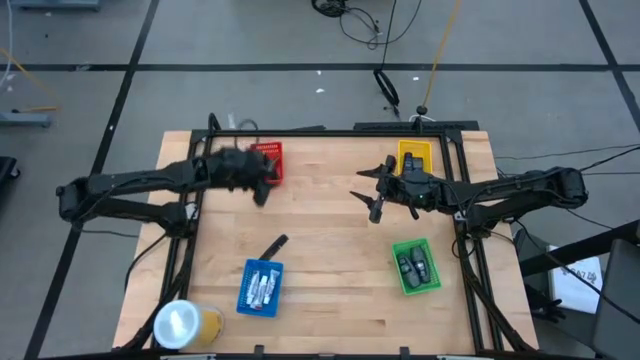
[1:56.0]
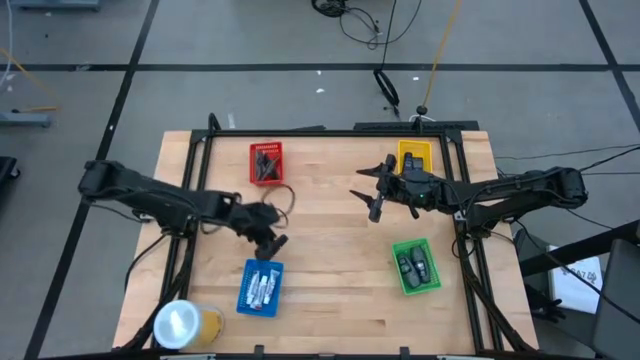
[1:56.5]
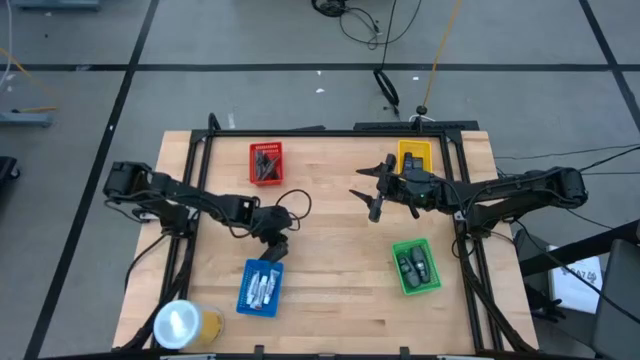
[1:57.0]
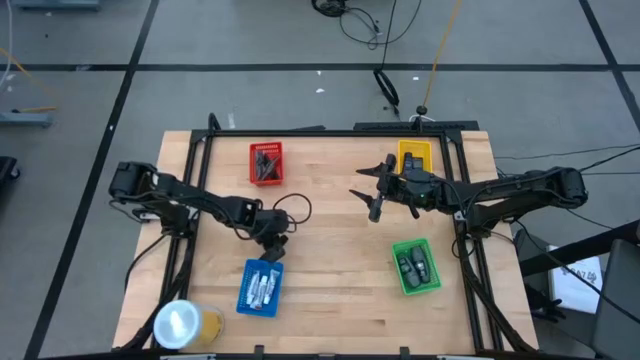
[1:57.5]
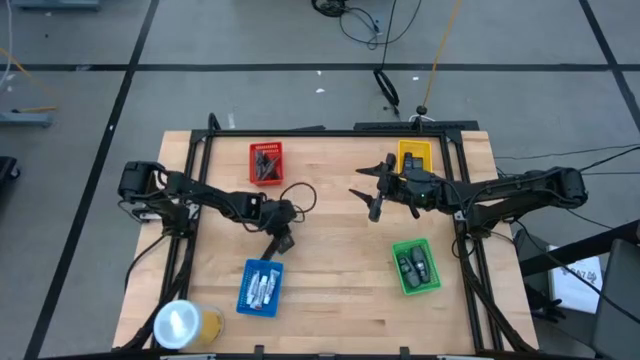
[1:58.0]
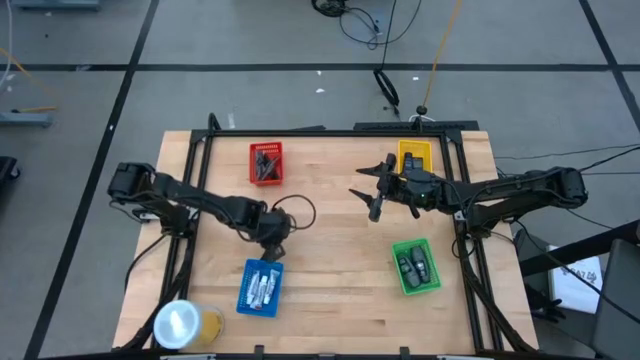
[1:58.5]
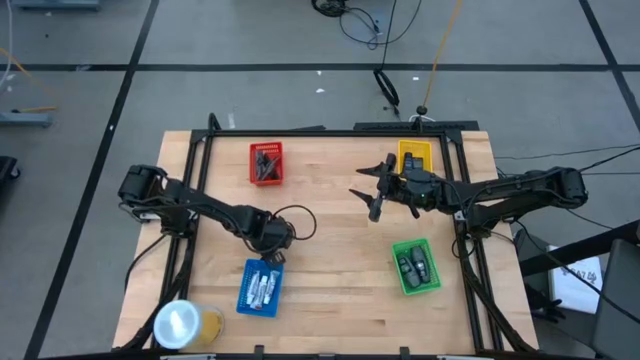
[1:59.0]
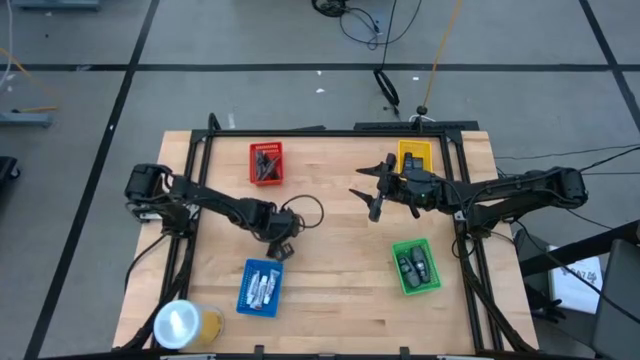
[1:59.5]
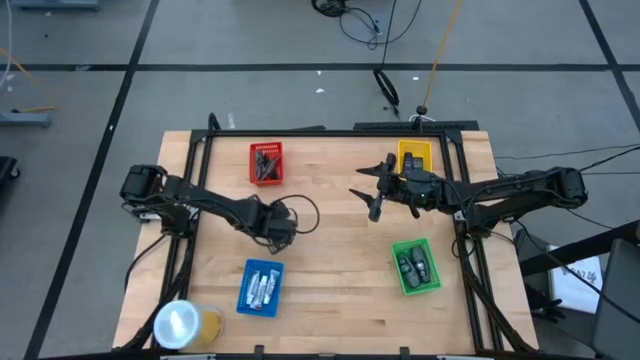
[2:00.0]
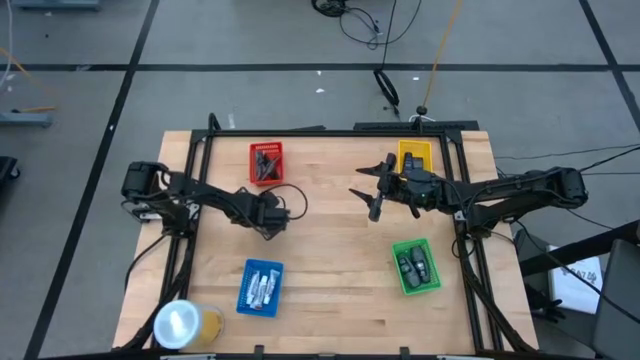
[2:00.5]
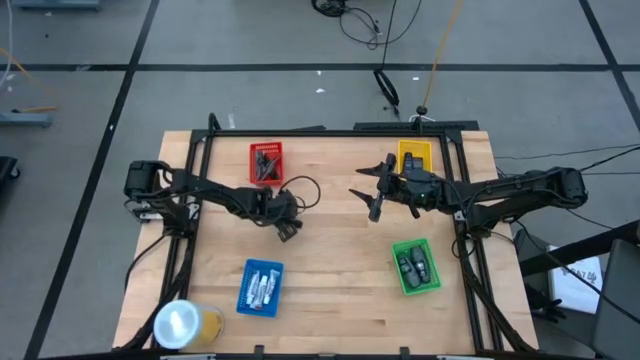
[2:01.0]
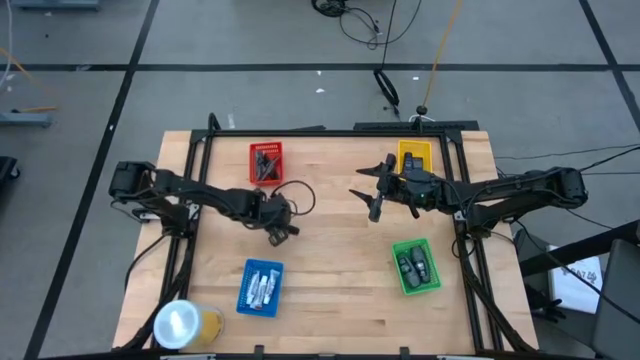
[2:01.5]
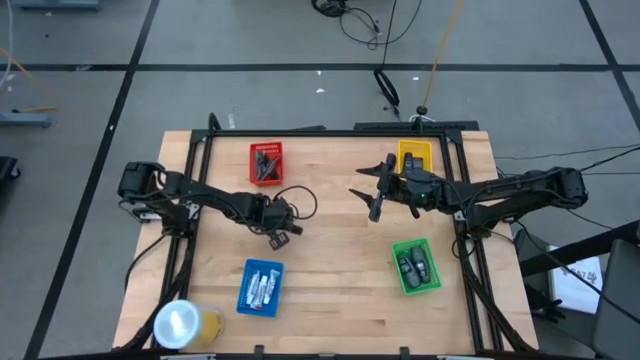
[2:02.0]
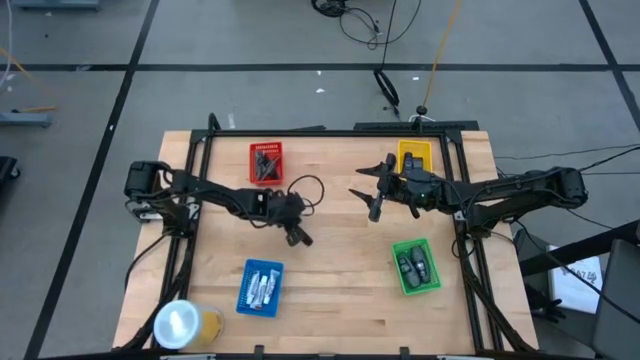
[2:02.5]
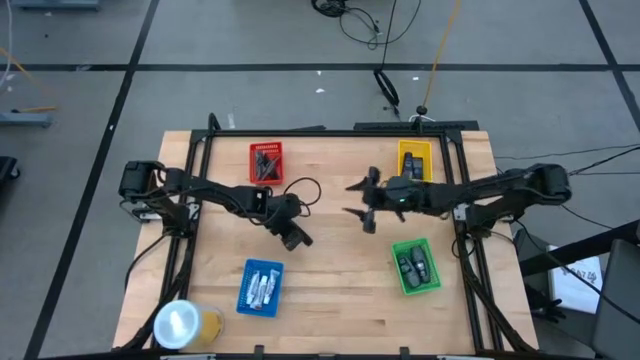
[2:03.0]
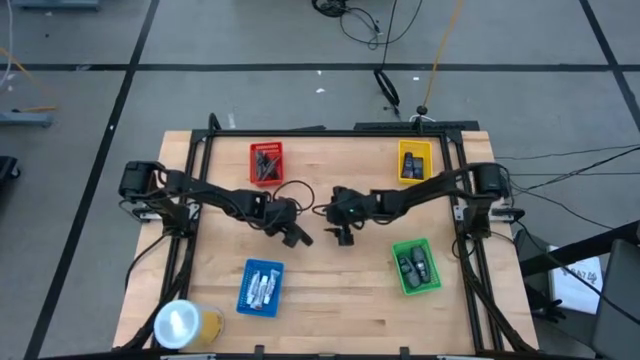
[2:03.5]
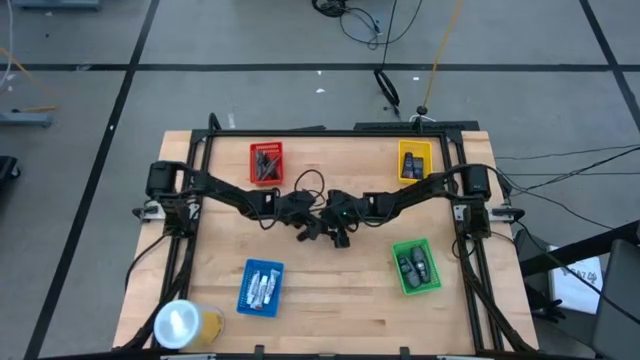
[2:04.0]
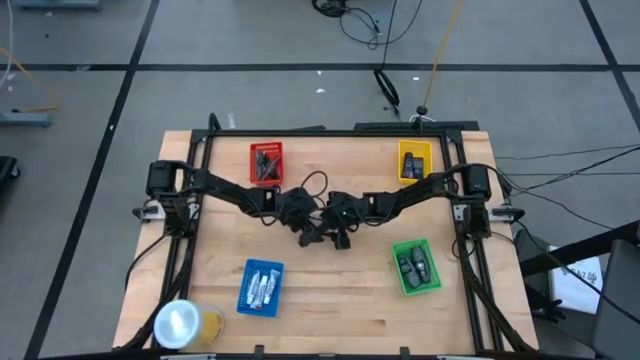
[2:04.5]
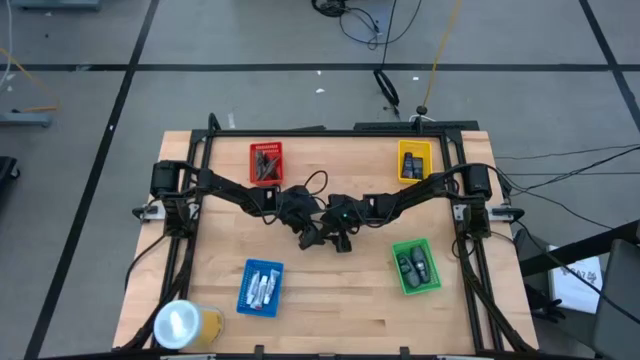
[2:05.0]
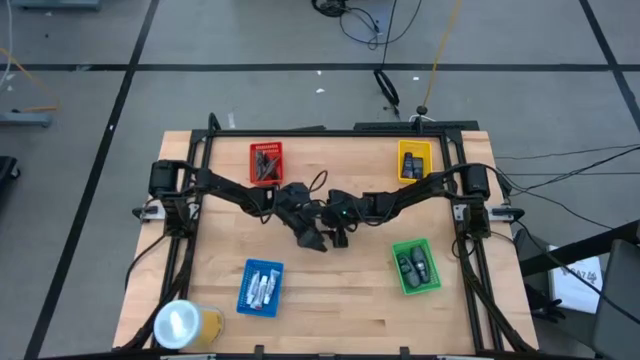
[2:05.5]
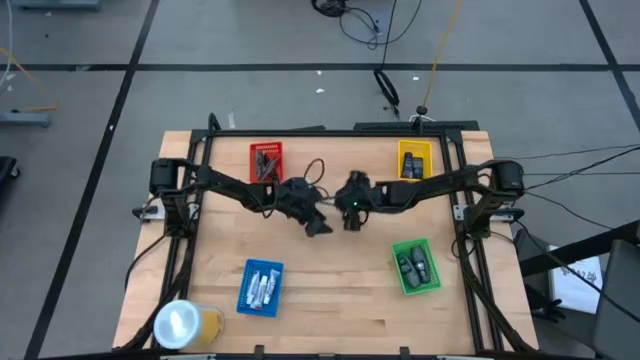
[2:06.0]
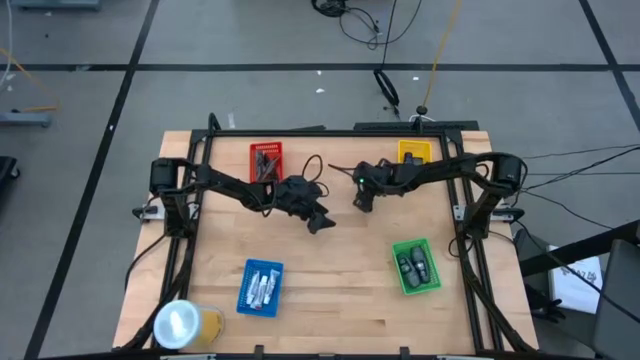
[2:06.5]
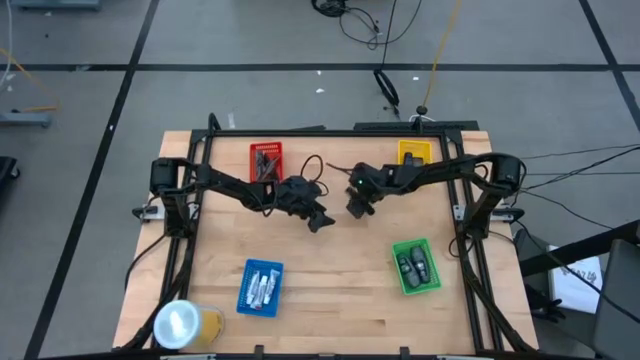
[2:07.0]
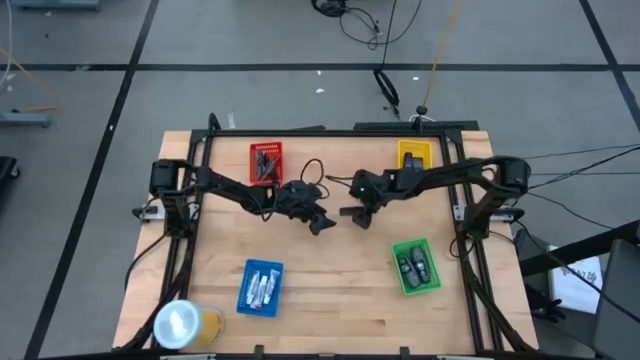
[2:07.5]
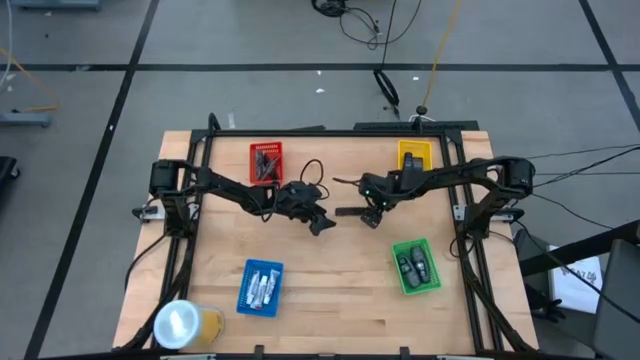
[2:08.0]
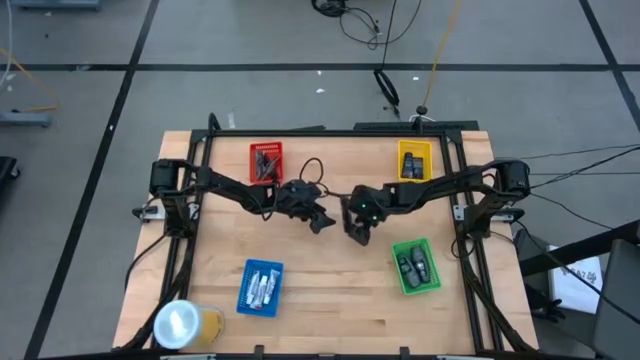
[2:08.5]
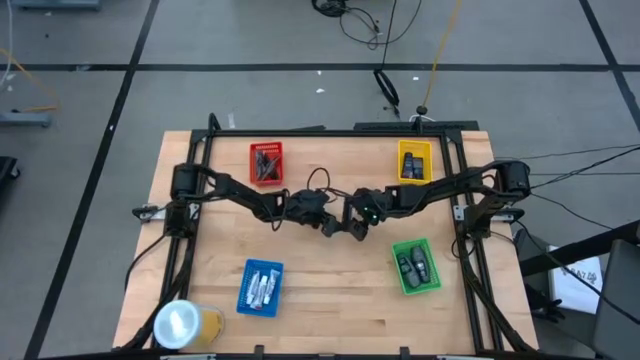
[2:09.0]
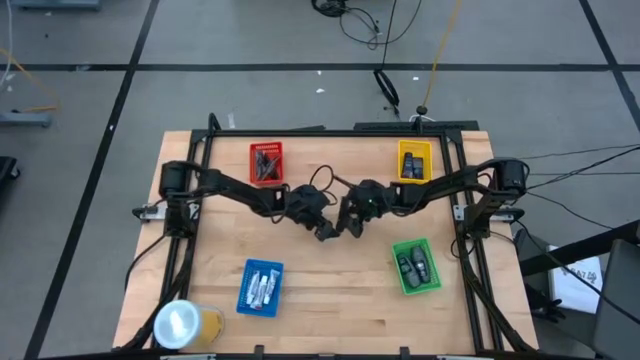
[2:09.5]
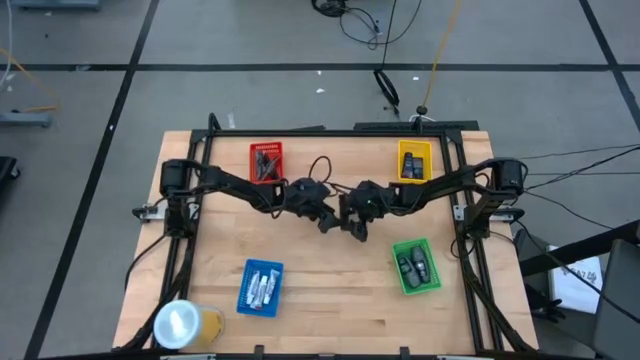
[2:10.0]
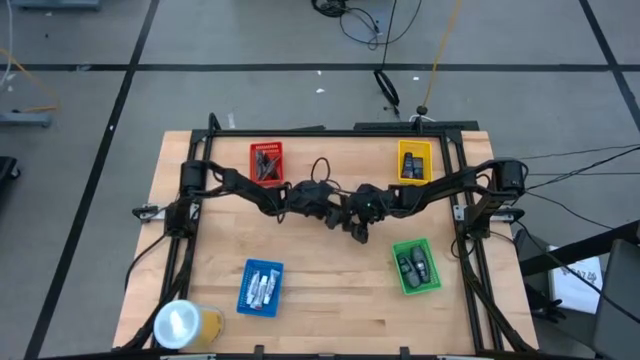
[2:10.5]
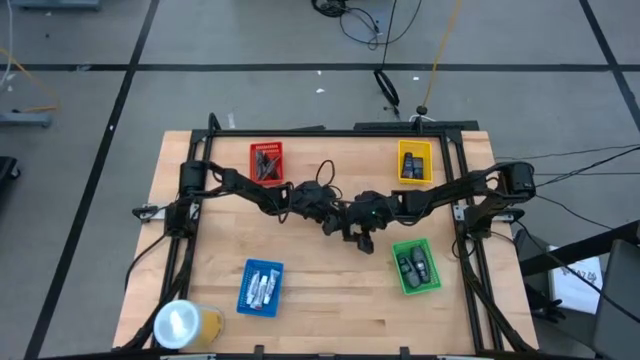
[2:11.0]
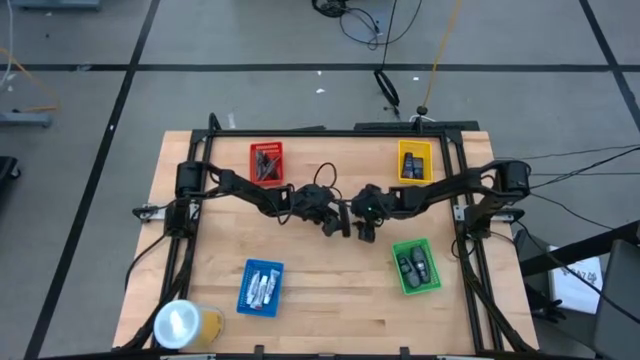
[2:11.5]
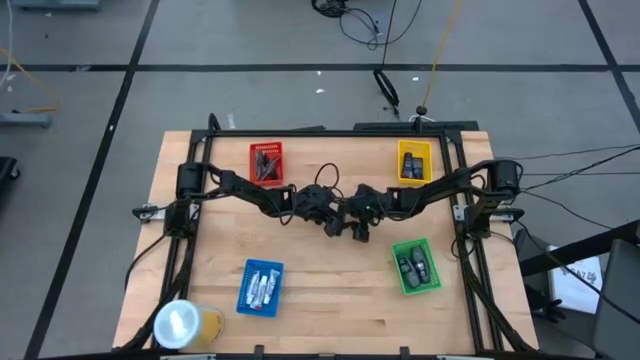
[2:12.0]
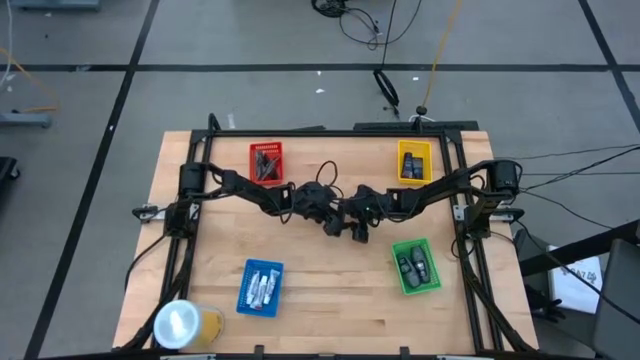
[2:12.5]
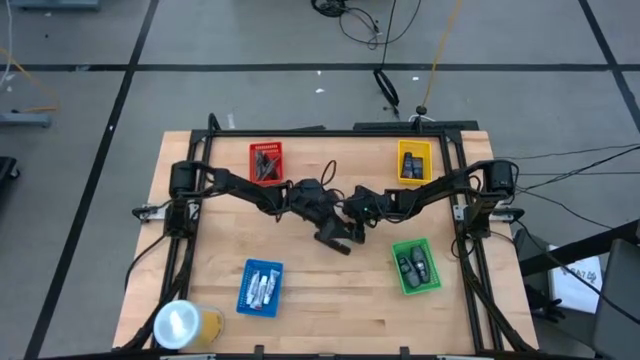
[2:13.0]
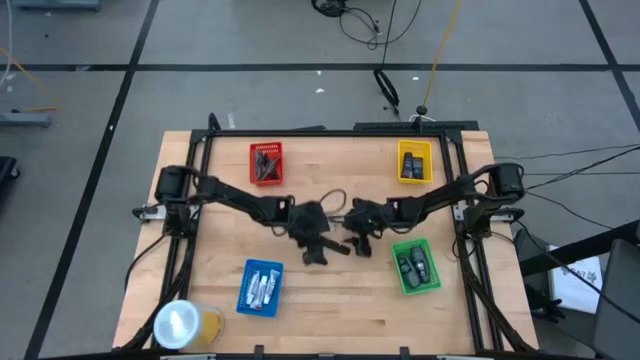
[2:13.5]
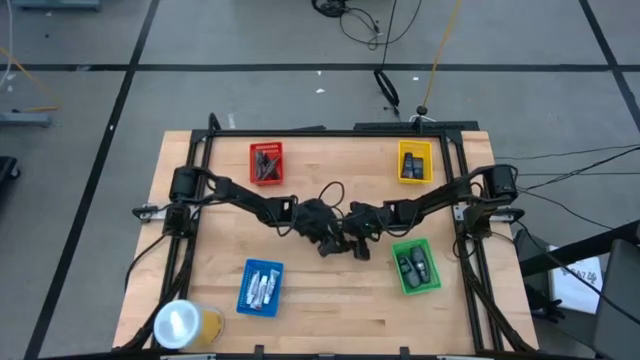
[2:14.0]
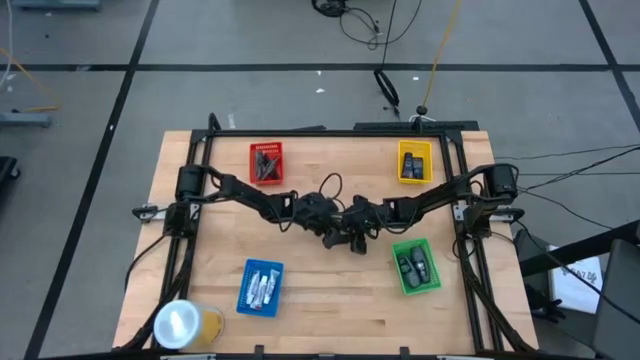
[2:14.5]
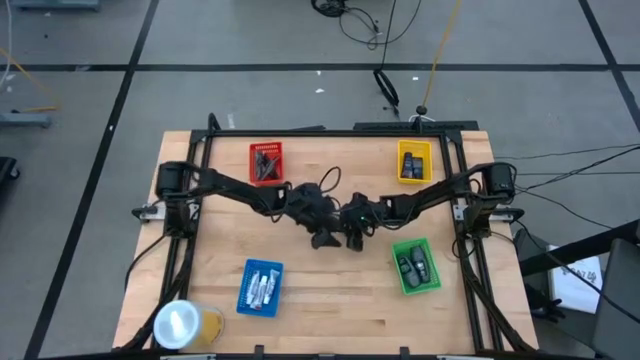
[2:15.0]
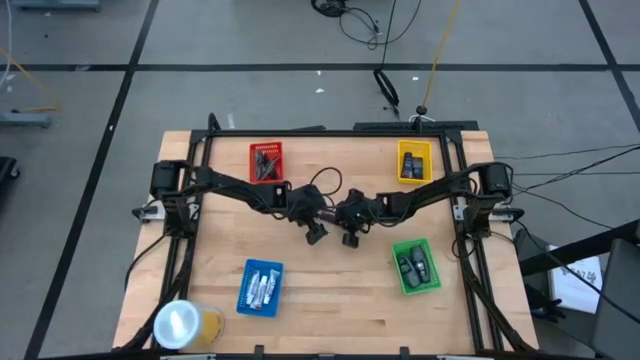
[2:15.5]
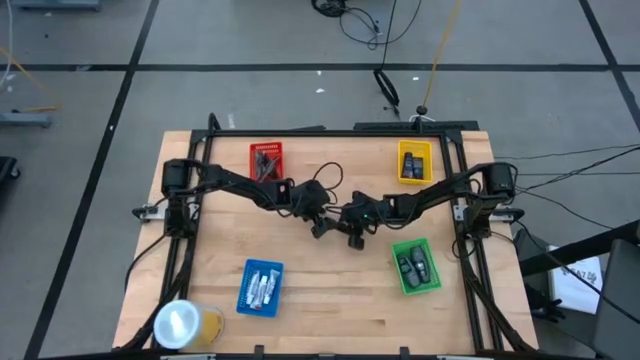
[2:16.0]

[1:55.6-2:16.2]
Task: Pick & Place Travel size toiletries
Put the black comb into the orange basket
